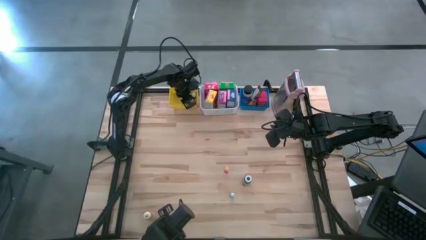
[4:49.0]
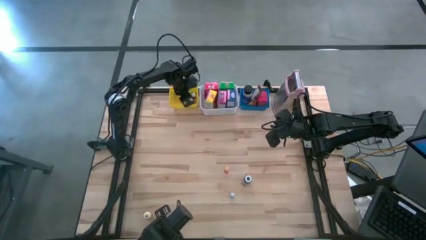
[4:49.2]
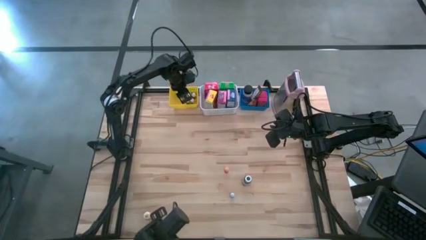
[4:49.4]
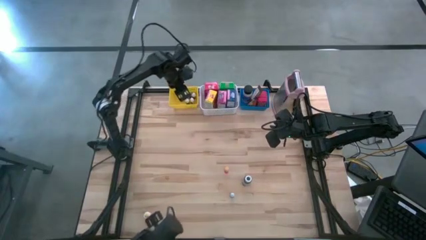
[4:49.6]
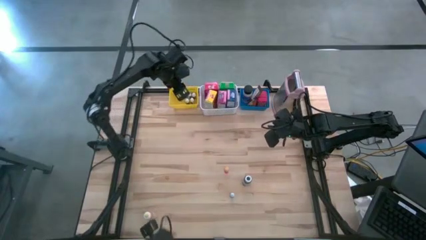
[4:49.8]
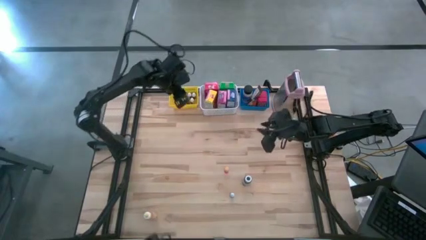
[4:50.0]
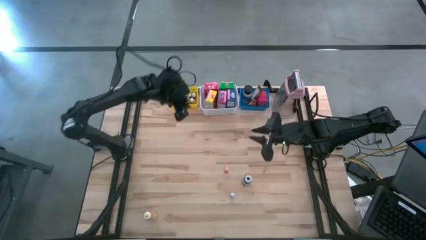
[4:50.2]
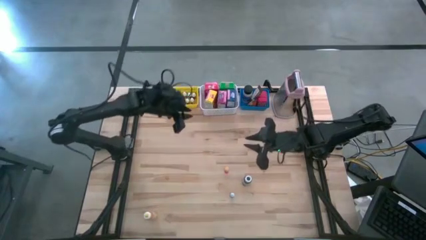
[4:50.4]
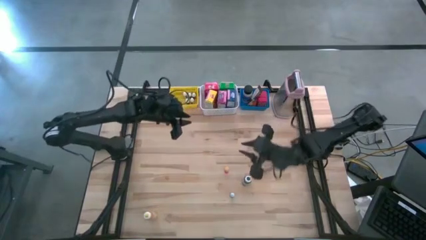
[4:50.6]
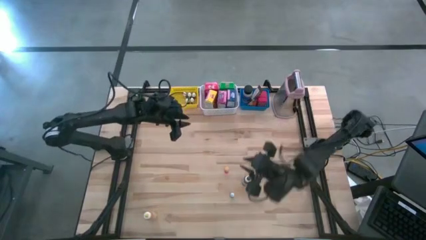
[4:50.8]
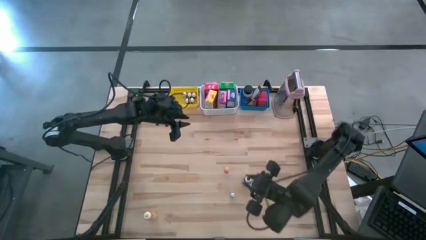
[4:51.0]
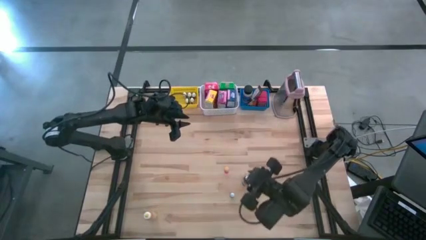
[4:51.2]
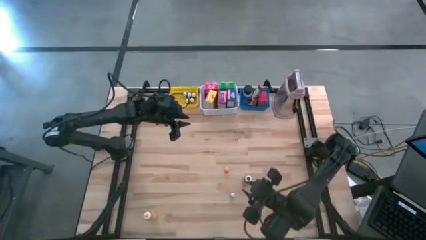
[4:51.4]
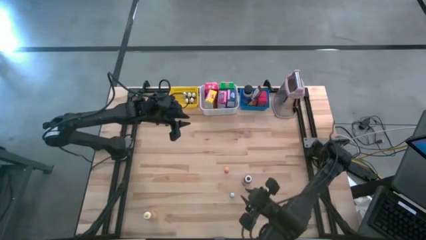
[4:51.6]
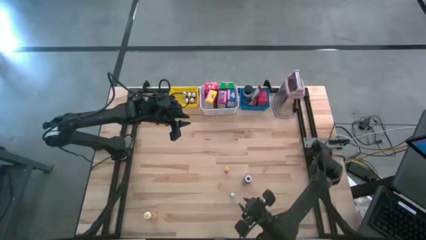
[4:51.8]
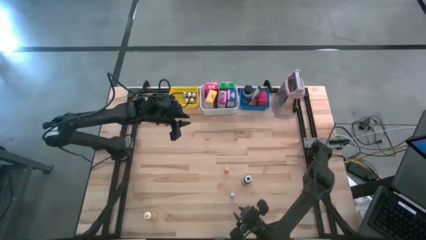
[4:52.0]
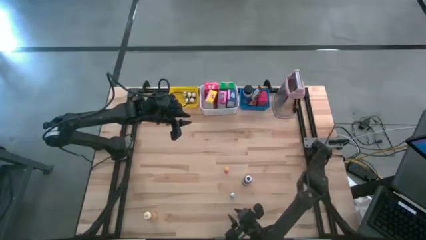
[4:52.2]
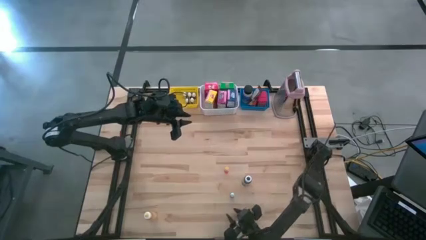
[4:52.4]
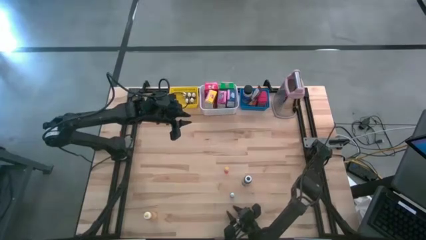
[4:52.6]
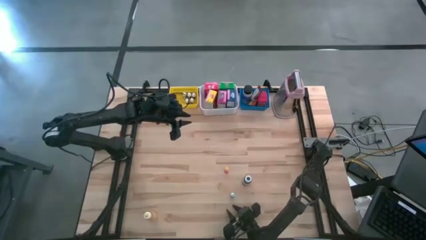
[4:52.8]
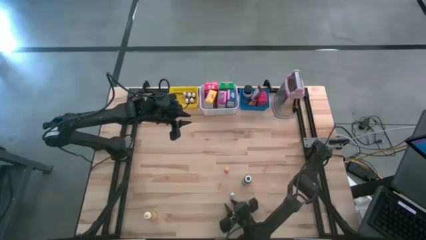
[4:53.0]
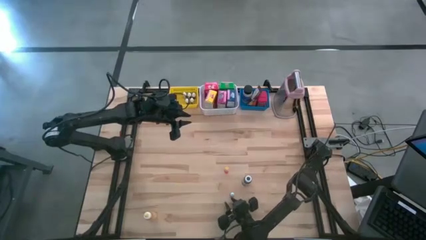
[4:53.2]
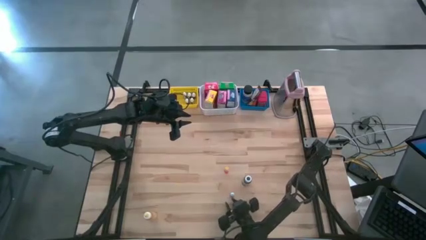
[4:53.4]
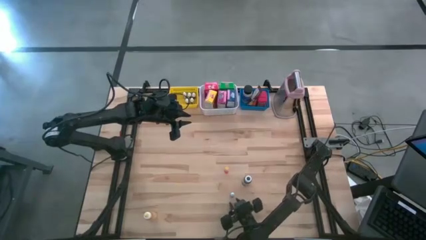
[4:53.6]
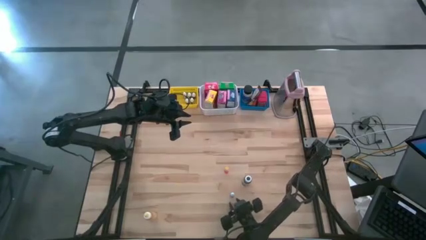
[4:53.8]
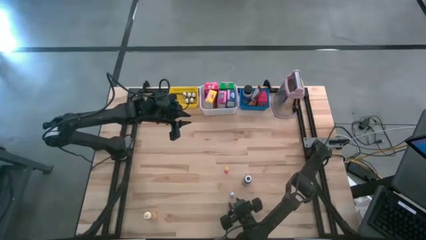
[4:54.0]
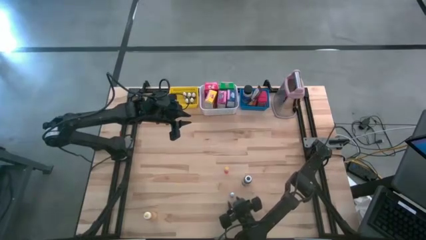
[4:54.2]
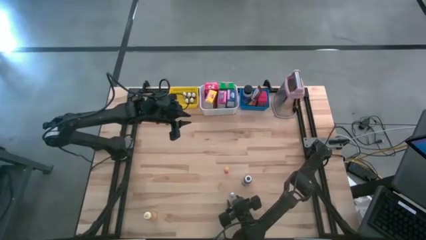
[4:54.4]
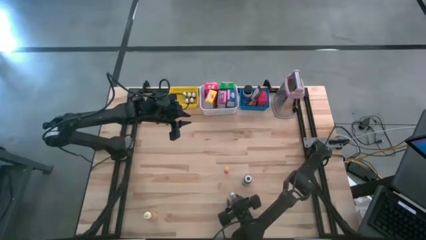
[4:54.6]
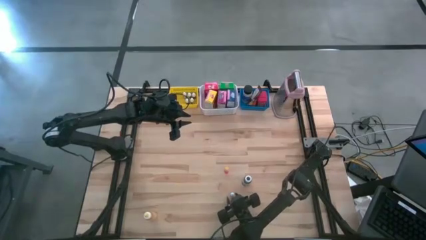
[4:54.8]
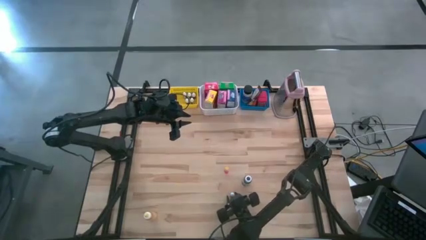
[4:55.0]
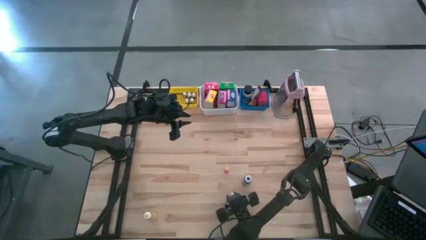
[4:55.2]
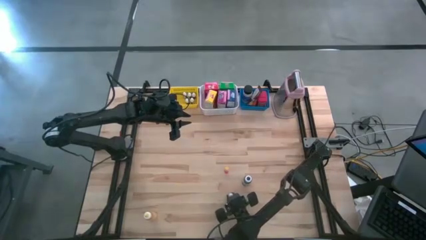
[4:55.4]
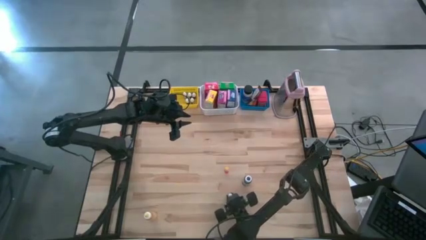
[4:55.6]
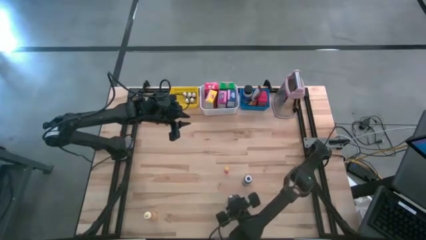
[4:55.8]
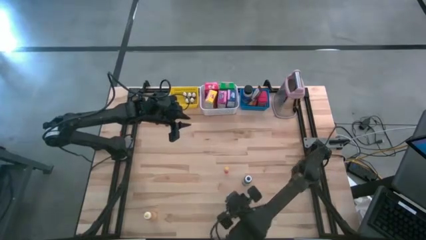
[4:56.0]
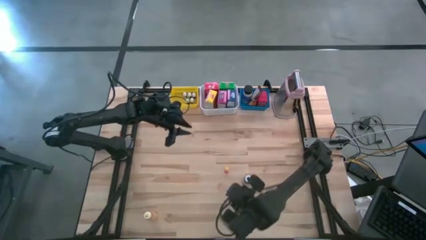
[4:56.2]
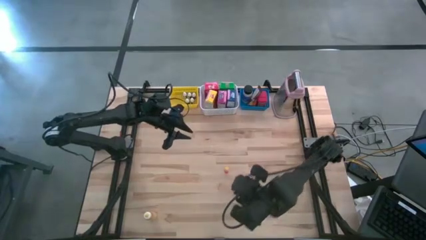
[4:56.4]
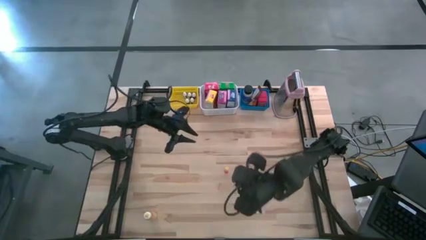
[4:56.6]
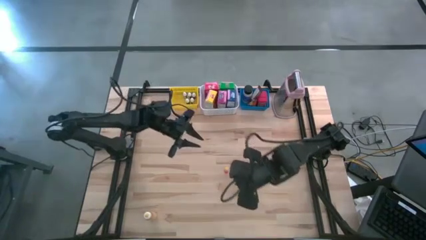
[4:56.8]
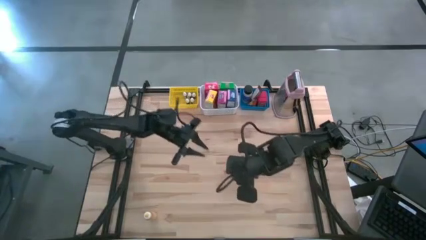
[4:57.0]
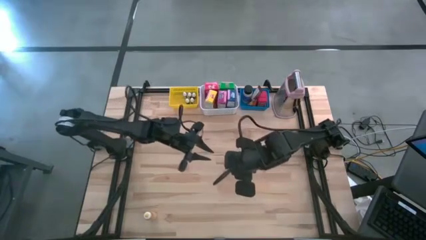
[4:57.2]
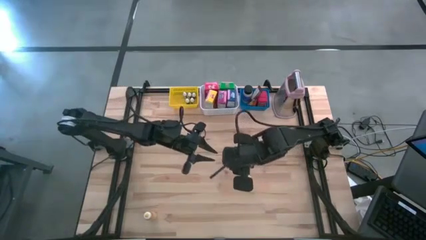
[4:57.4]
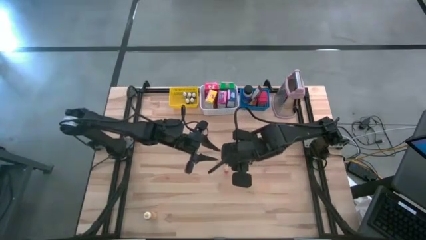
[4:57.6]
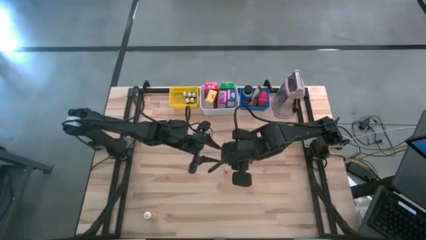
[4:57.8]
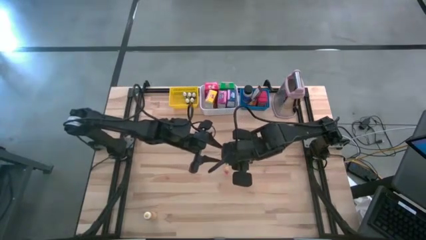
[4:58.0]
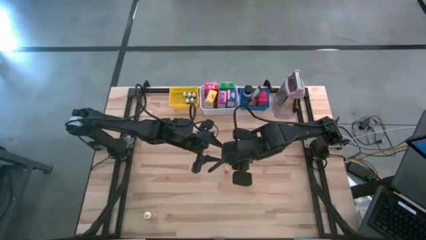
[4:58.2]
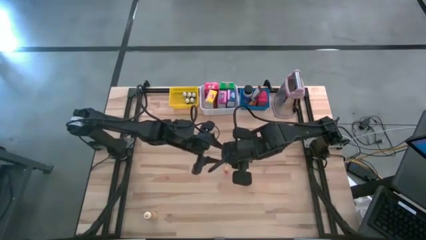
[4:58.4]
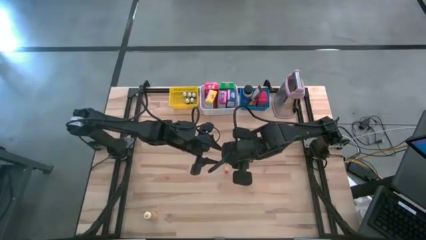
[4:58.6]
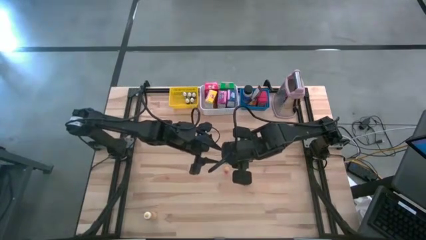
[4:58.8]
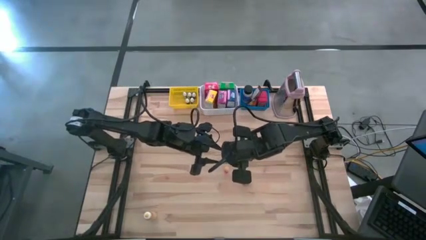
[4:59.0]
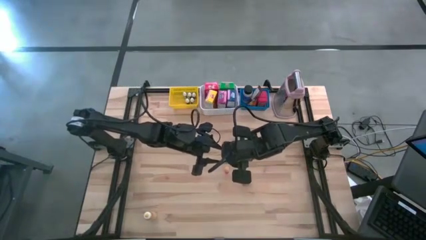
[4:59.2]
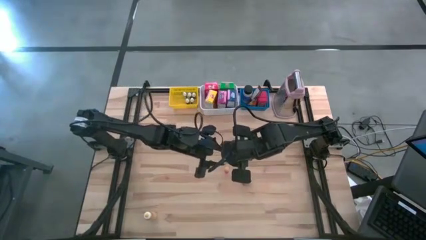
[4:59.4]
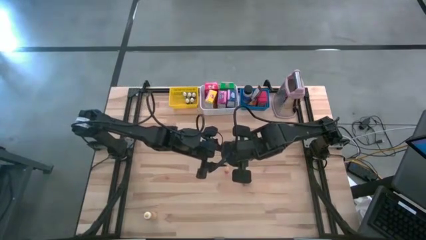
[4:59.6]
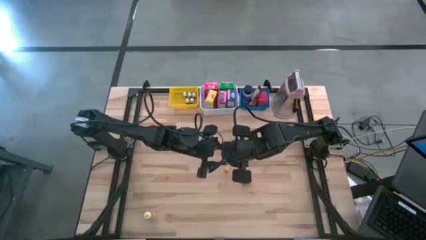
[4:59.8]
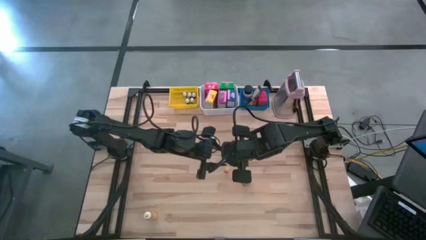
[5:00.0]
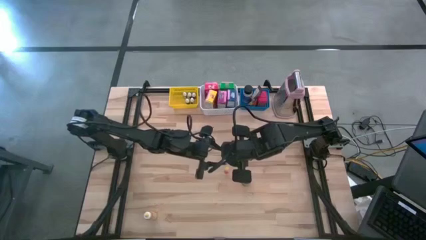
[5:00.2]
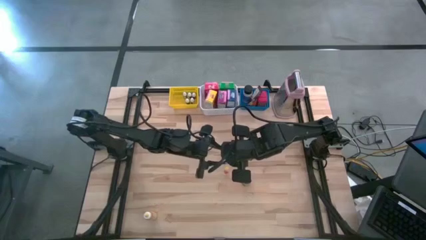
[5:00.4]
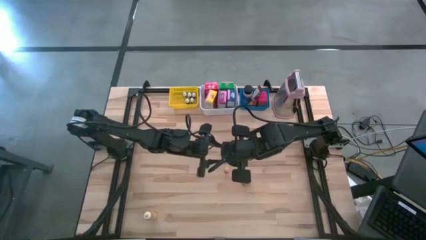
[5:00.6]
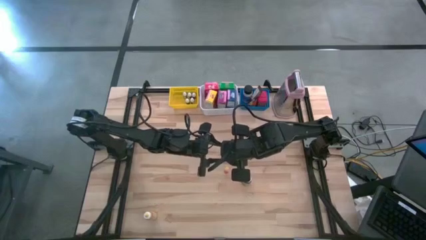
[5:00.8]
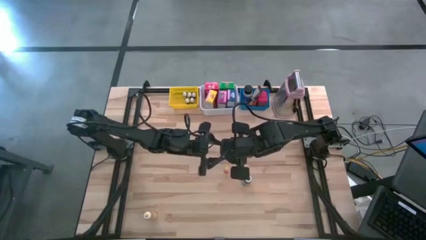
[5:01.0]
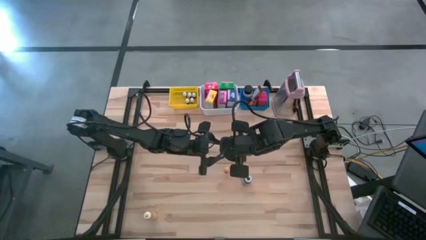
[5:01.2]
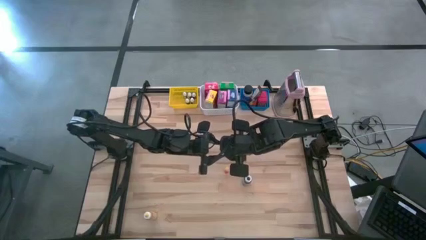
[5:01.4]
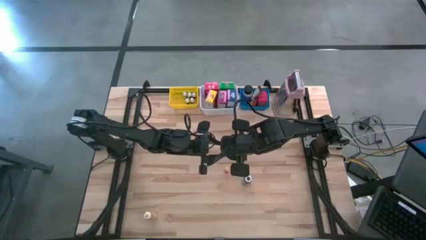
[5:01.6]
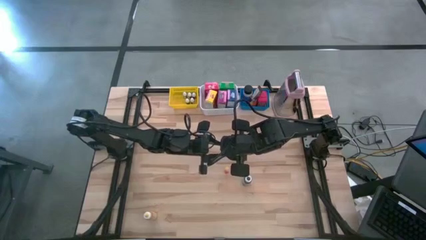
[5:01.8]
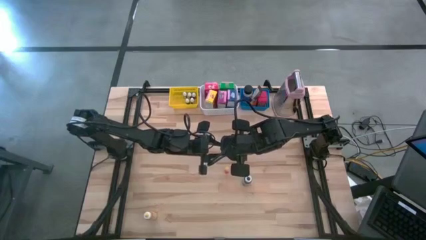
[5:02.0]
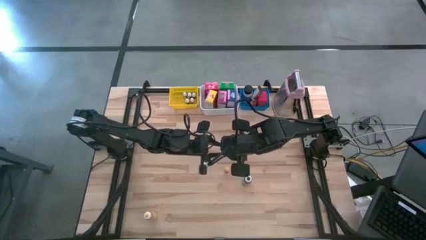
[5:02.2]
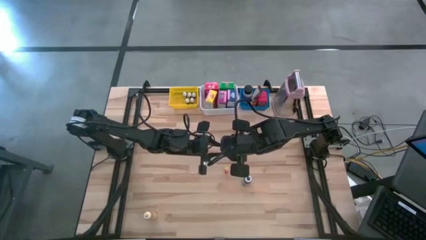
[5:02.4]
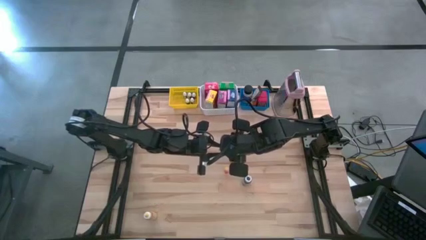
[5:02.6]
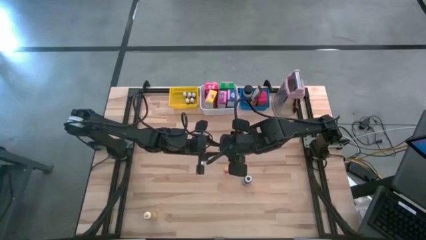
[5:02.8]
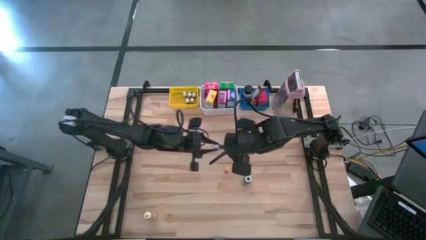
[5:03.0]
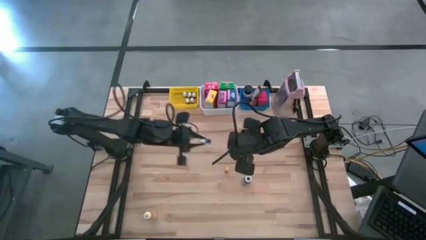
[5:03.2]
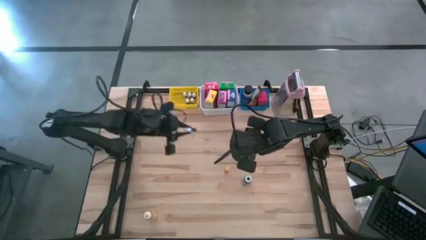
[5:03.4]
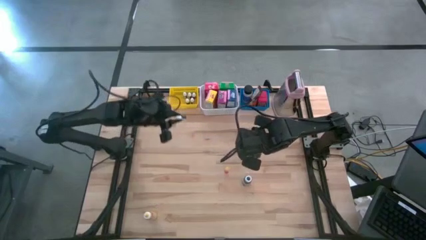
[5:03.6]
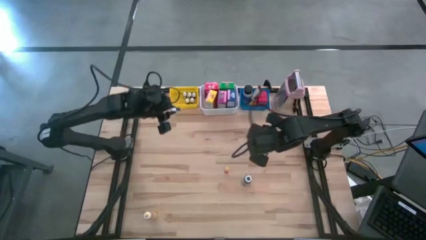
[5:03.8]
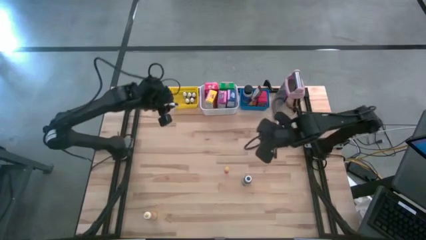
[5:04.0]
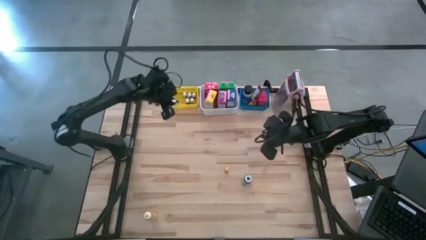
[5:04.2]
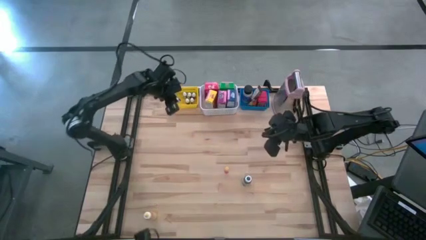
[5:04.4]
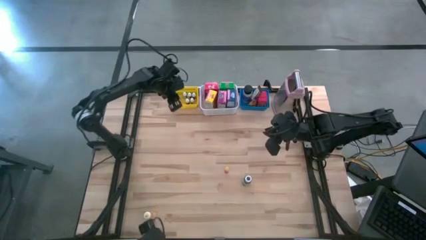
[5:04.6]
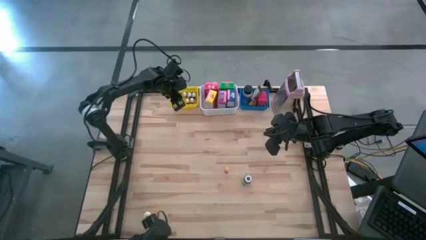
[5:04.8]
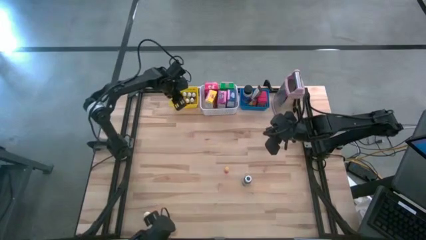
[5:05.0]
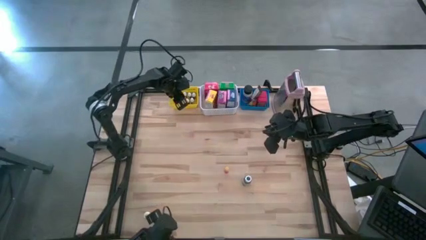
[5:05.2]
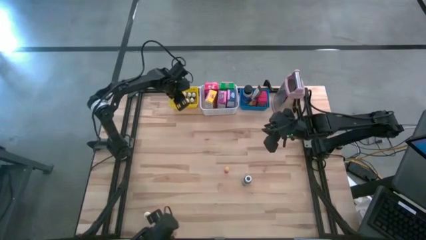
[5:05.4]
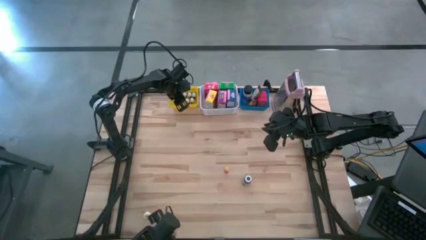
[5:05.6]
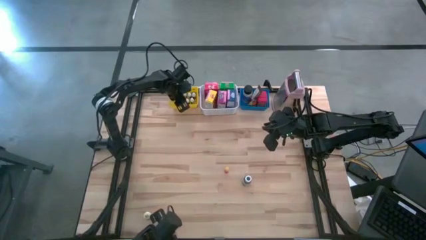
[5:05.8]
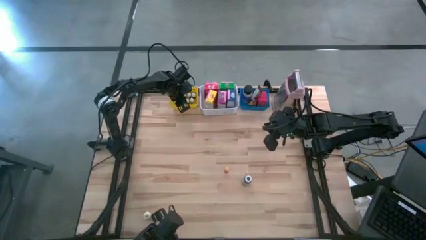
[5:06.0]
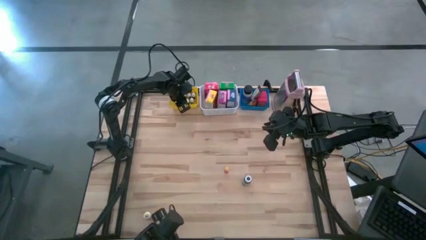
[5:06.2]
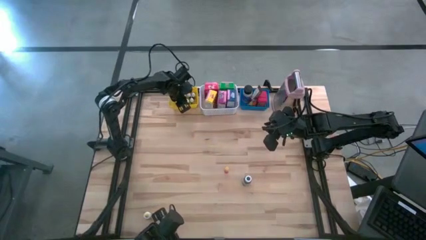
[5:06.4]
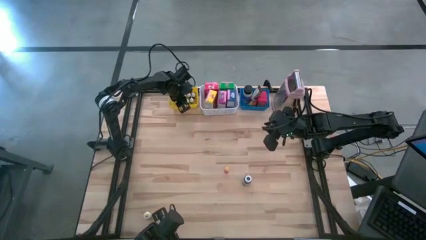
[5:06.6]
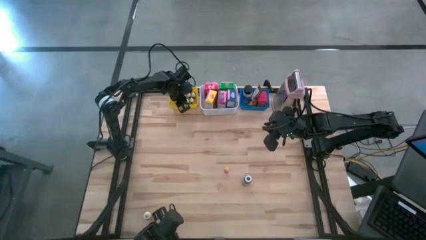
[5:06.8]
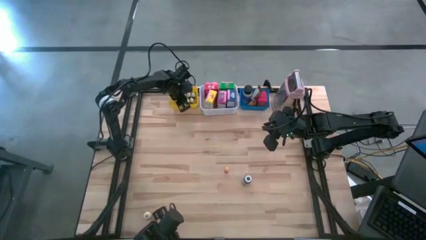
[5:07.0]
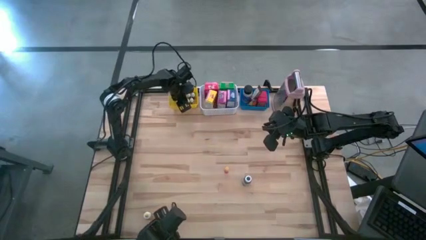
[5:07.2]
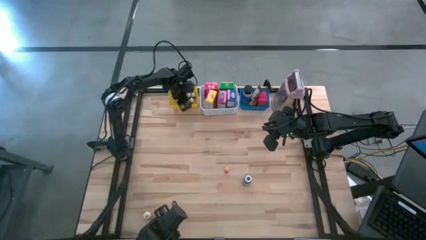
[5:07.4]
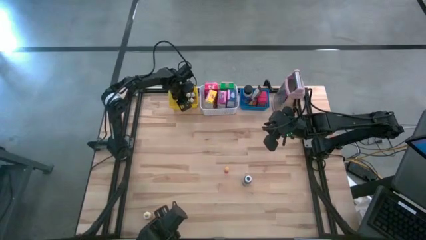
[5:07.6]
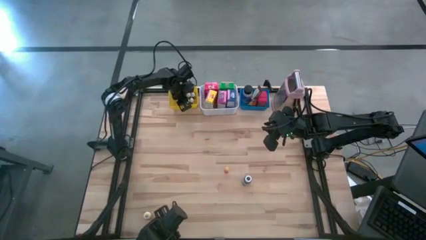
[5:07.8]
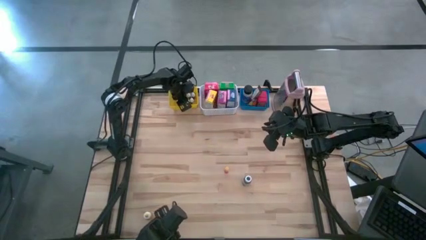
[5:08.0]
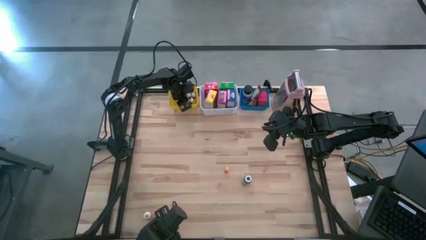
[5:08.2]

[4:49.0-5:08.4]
Task: Pick & Place Kitchen Items
Put the black food coloring bottle into the yellow basket
